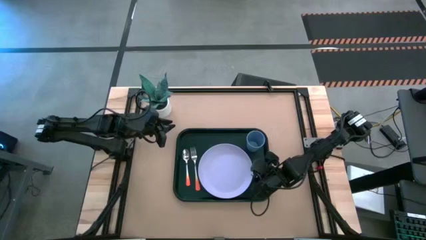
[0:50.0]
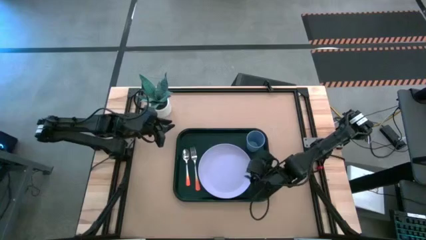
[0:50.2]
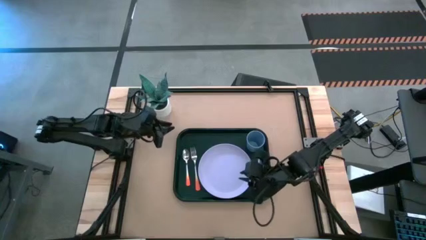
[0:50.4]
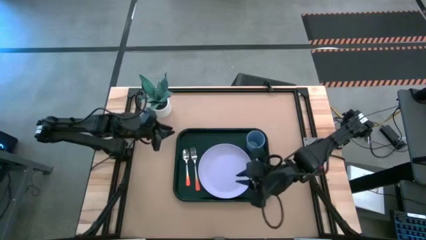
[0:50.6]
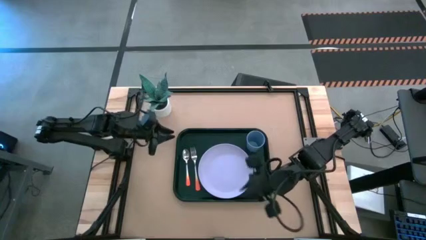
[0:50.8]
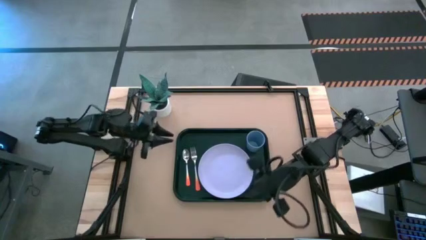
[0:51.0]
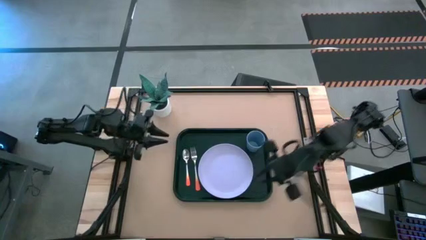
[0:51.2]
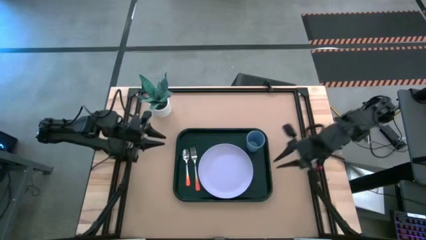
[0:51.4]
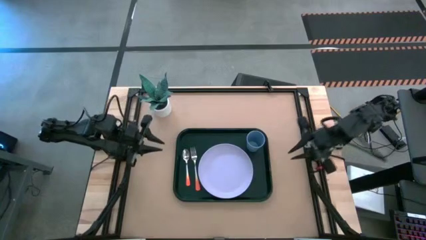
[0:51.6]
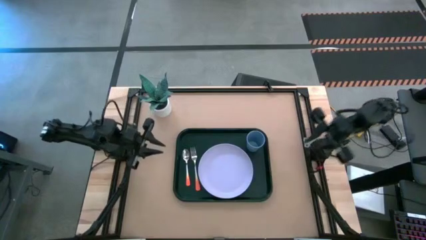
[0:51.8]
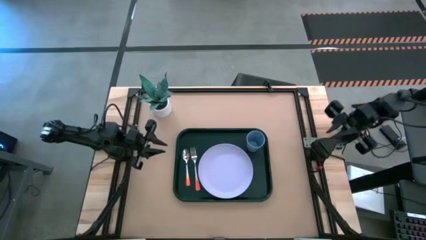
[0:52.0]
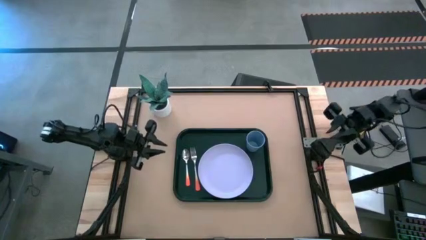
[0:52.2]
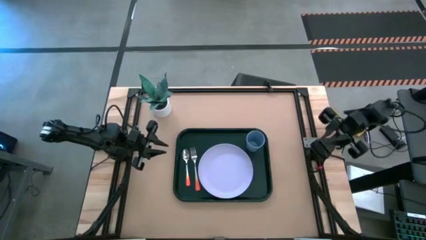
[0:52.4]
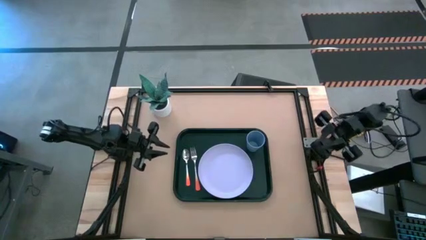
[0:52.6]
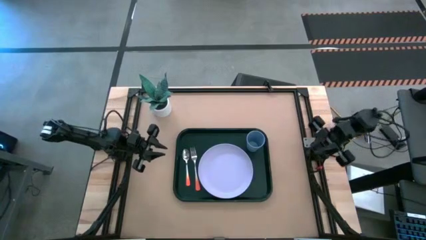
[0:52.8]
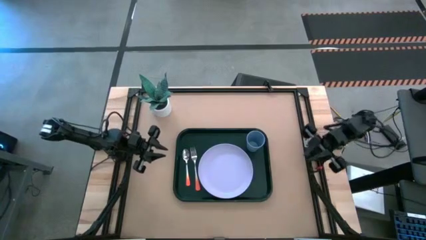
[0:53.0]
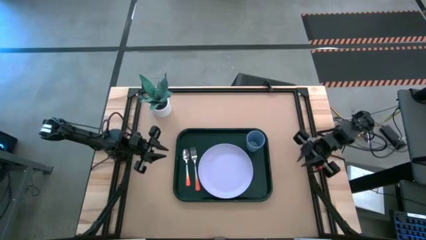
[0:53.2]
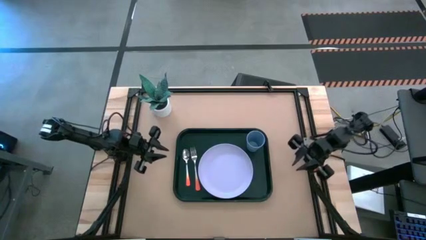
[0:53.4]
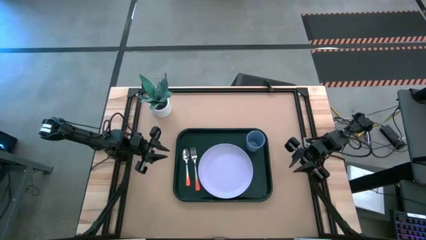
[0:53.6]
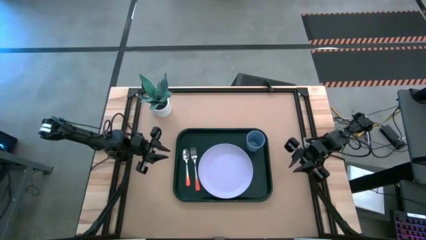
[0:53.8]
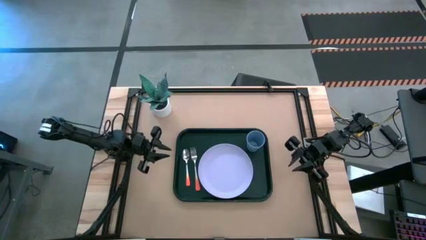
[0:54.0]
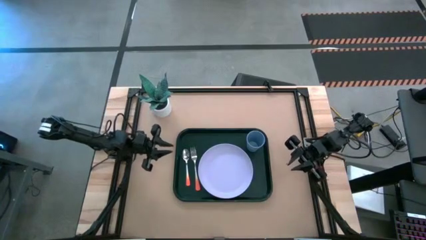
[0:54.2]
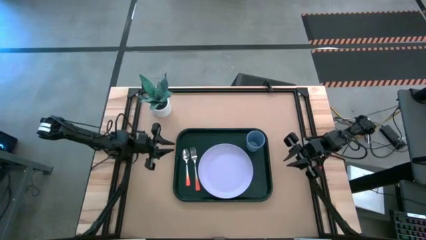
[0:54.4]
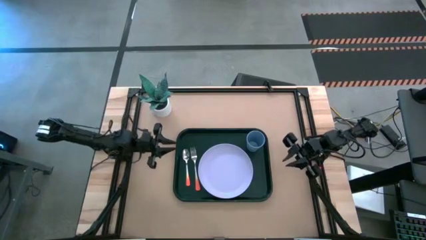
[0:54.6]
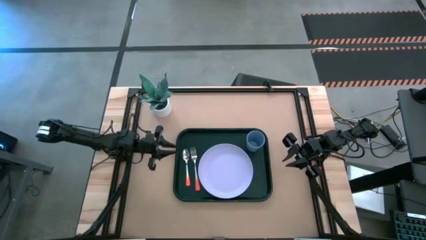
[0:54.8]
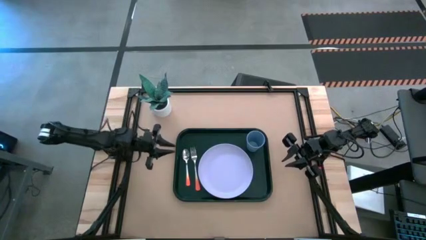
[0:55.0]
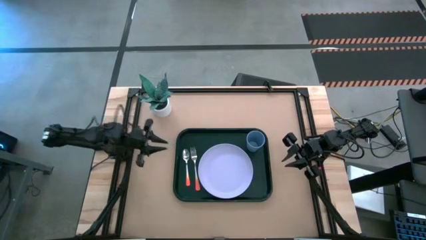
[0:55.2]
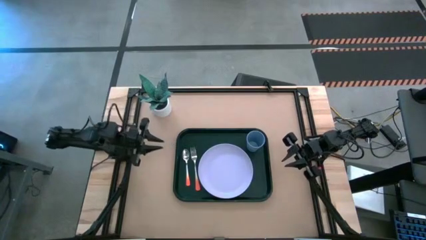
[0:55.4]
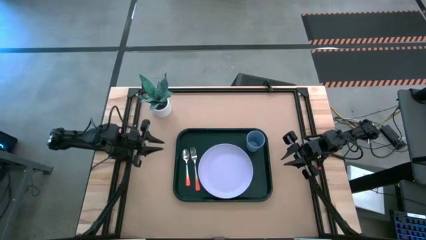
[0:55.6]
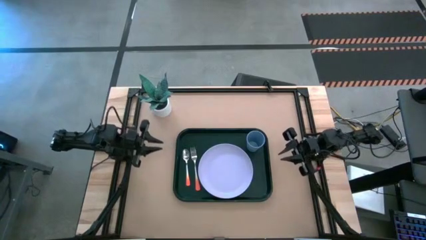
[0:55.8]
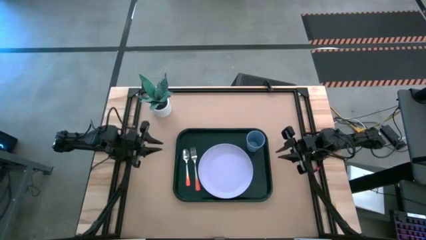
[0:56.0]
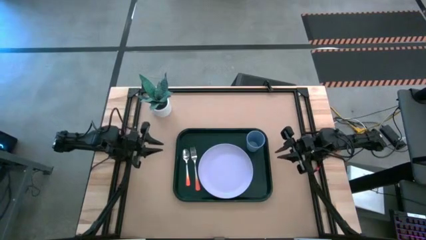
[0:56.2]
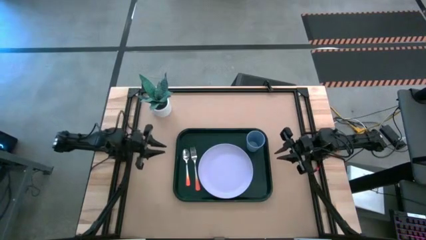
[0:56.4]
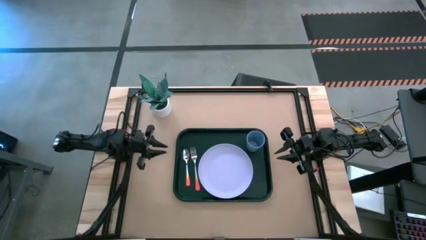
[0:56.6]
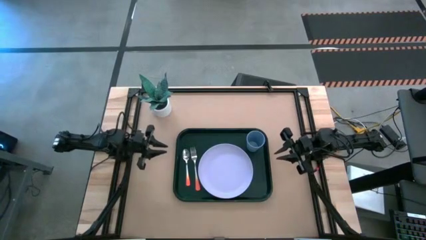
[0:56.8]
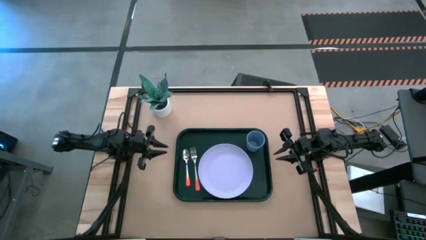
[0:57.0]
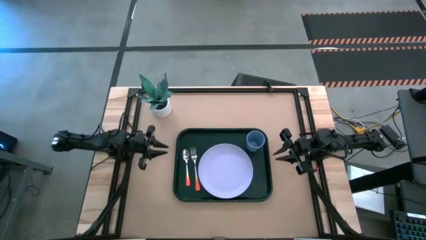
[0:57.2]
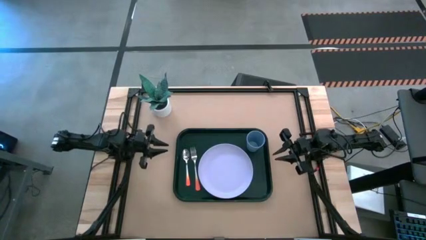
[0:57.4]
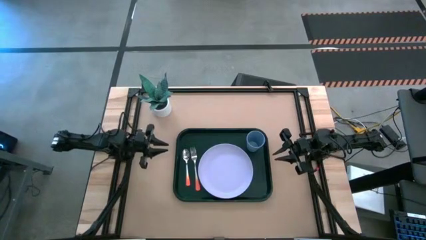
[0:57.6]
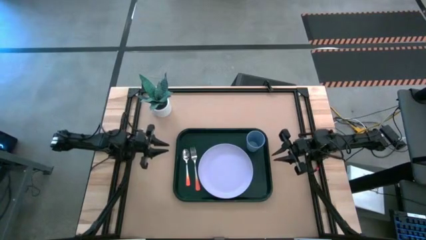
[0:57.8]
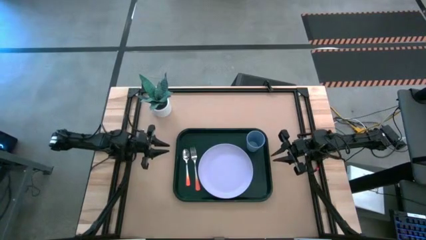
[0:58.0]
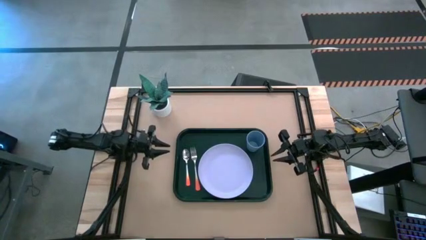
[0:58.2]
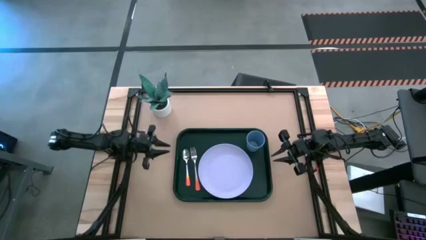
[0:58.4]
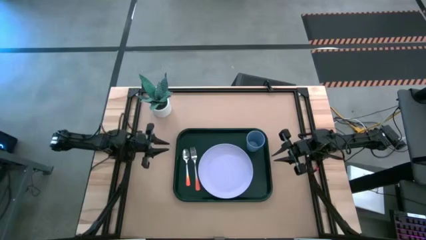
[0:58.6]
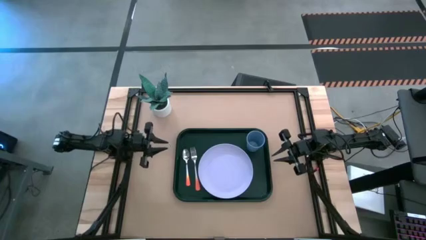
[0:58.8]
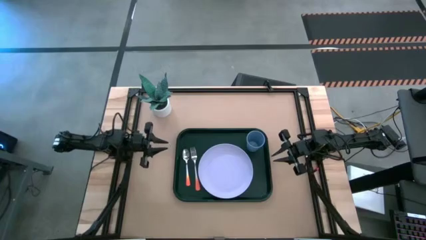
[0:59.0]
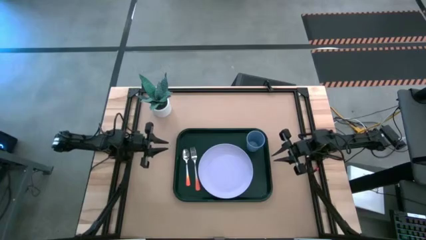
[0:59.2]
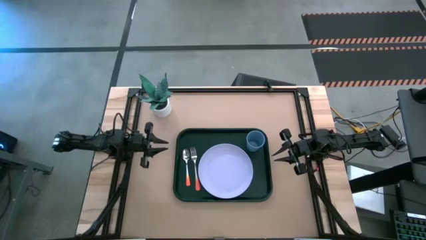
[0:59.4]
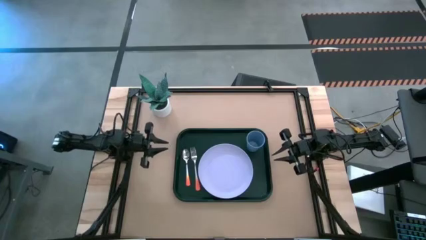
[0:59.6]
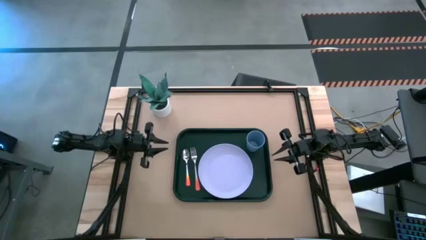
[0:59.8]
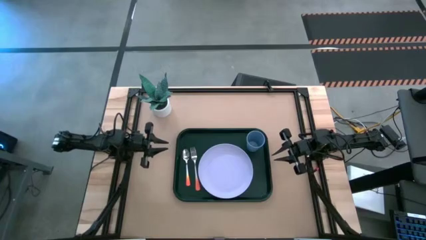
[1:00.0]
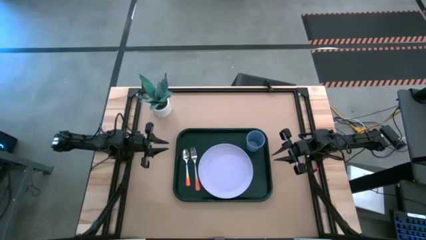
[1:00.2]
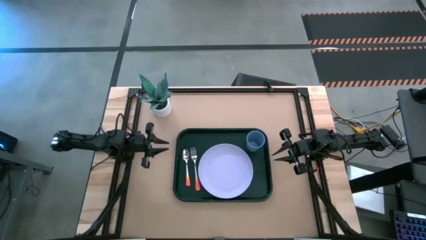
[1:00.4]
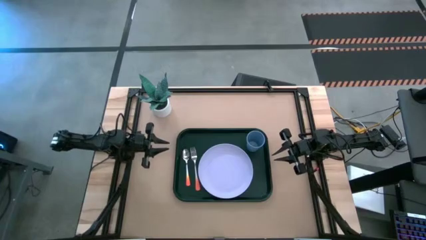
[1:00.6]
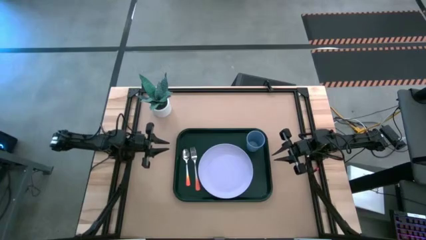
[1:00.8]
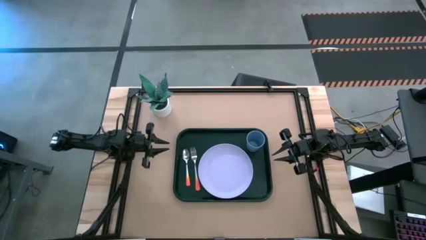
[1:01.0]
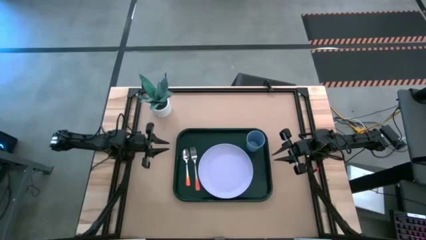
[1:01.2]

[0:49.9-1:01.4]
Task: Pick and place plate/cup/fork/spoon on tray
Return to Home Position

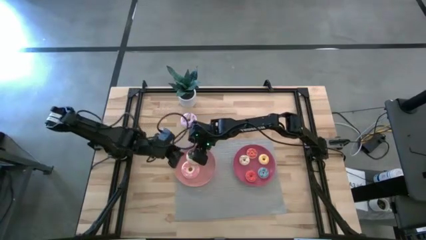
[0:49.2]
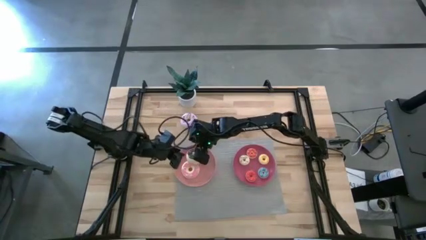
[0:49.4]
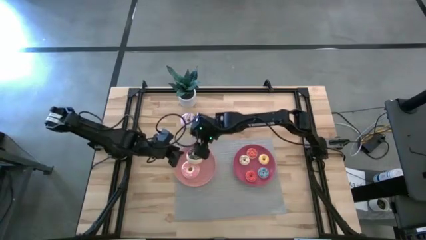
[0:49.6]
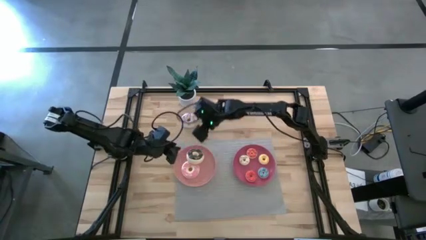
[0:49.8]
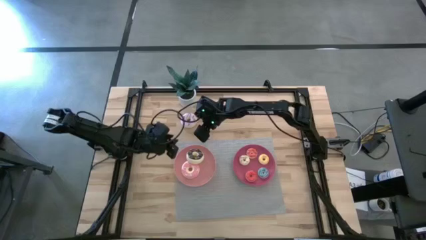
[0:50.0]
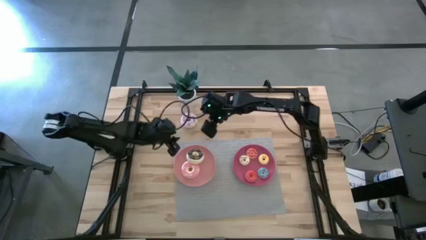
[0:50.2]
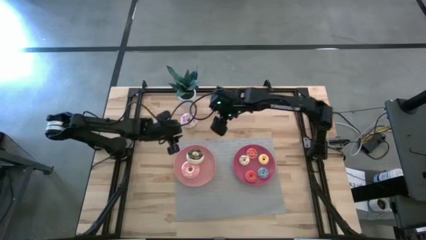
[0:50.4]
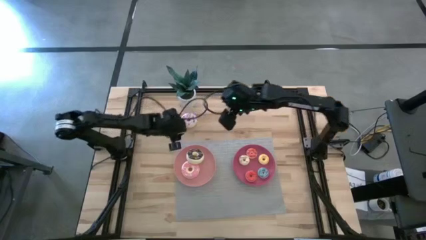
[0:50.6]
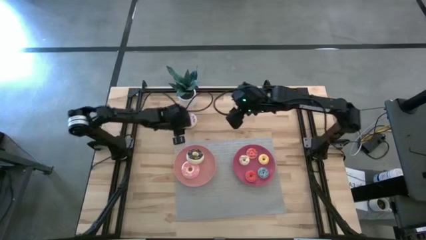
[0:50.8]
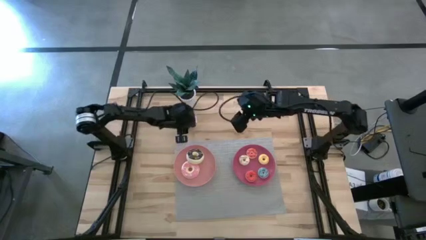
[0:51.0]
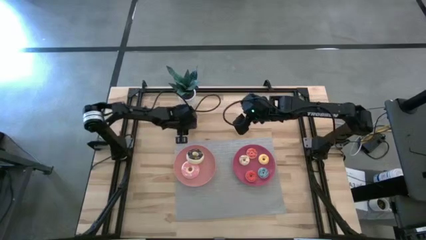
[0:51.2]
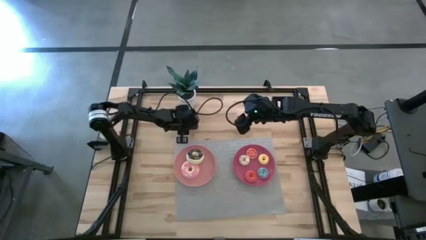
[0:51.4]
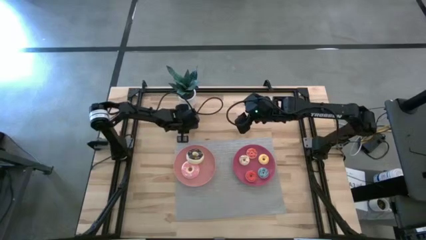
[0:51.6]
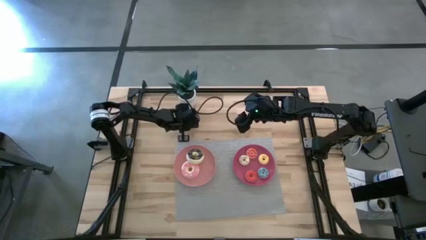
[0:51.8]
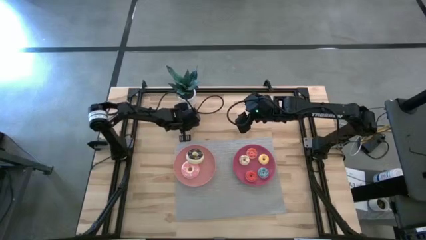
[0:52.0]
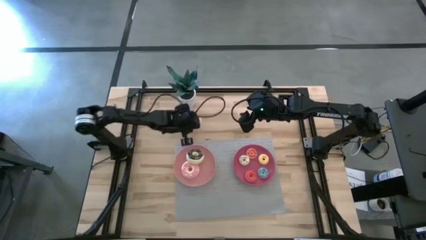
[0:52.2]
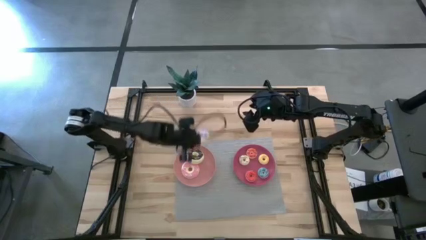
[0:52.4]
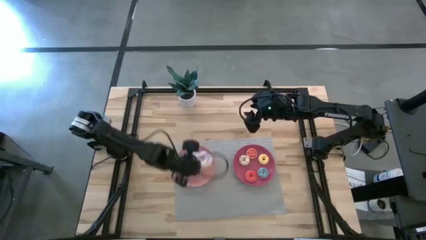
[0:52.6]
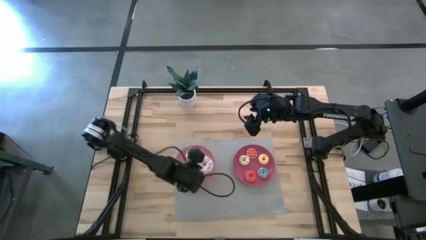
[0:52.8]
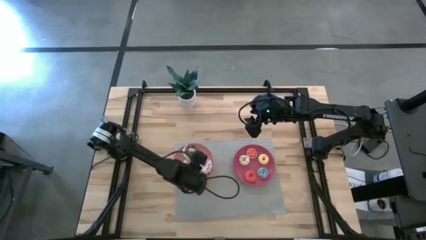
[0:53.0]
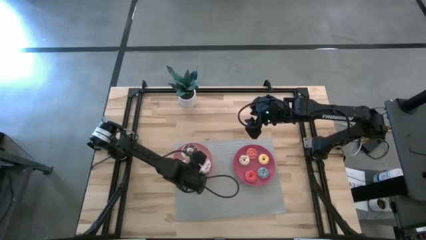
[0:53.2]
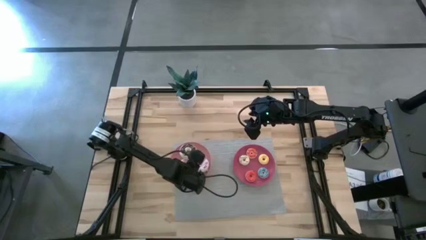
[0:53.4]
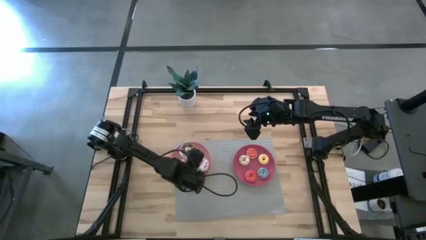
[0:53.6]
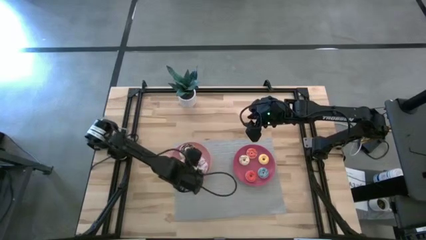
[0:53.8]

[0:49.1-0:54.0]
Task: Pick & Place donuts
Put the large purple donut on the light pink plate
